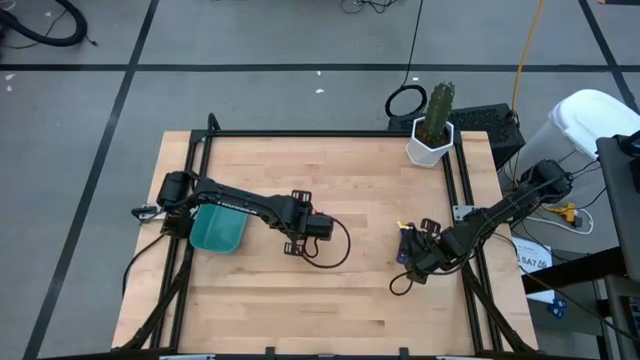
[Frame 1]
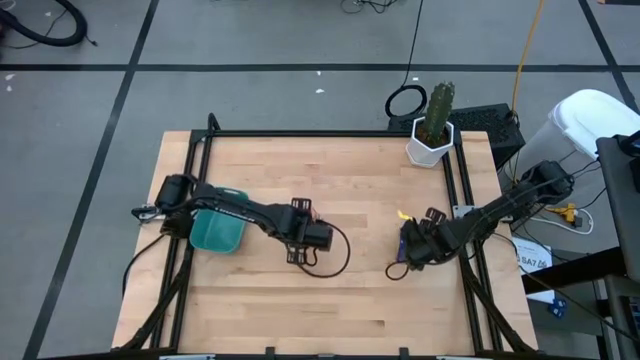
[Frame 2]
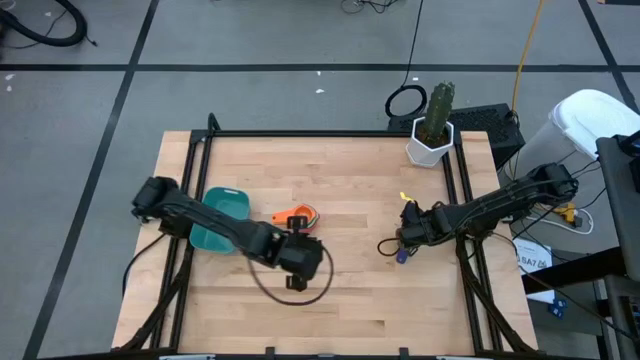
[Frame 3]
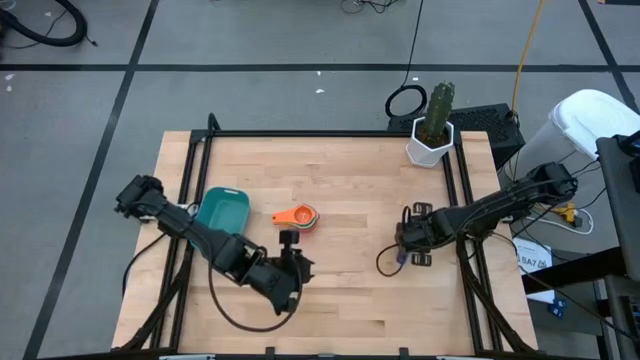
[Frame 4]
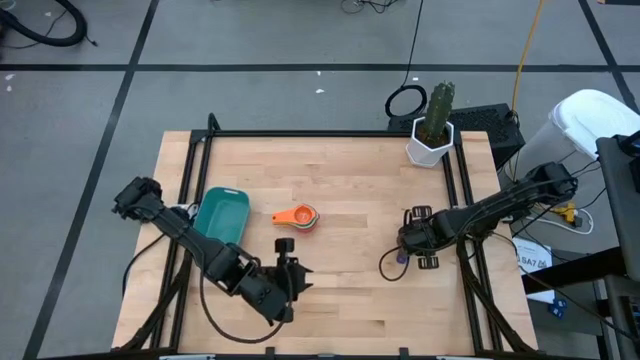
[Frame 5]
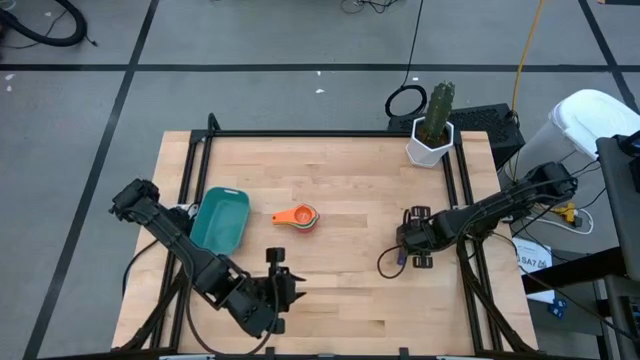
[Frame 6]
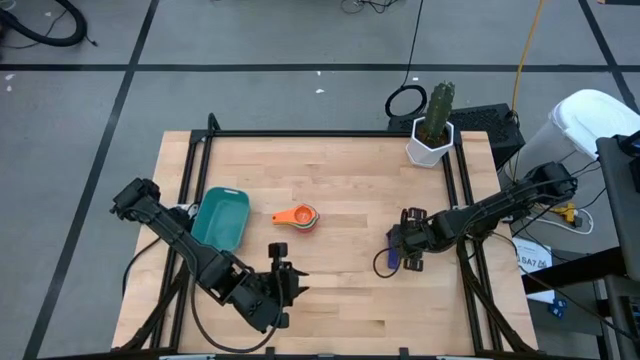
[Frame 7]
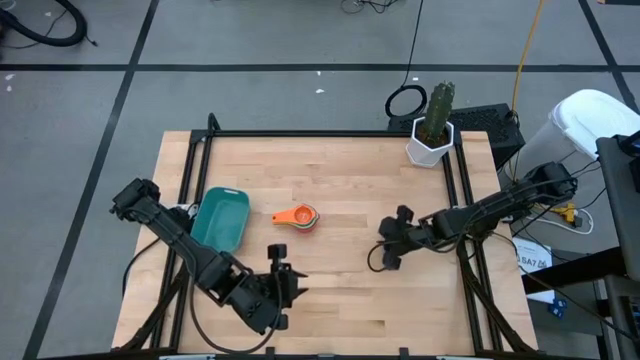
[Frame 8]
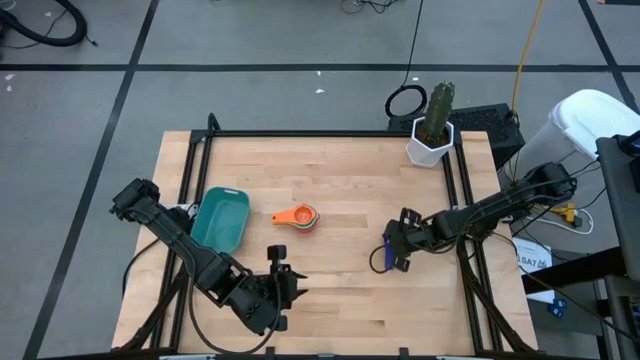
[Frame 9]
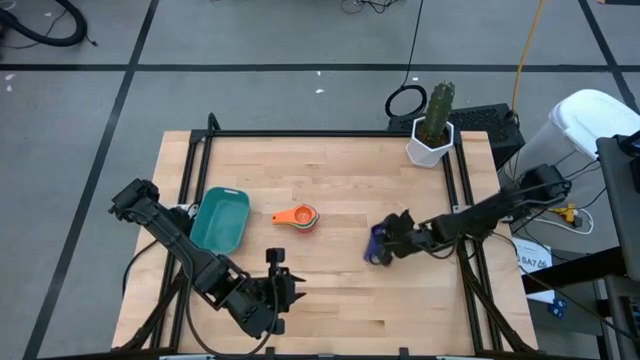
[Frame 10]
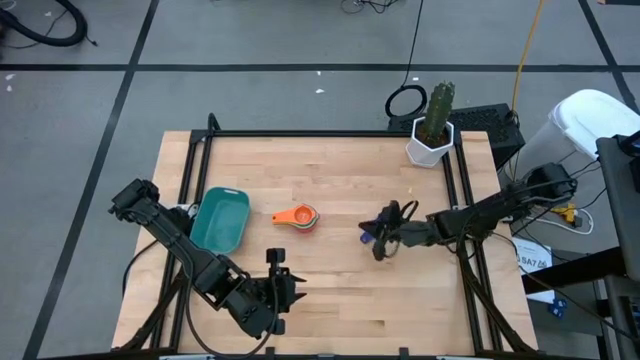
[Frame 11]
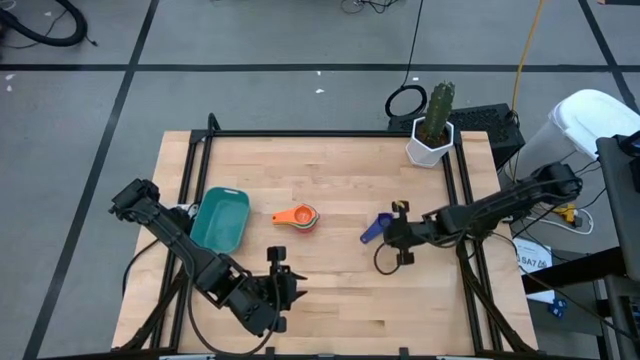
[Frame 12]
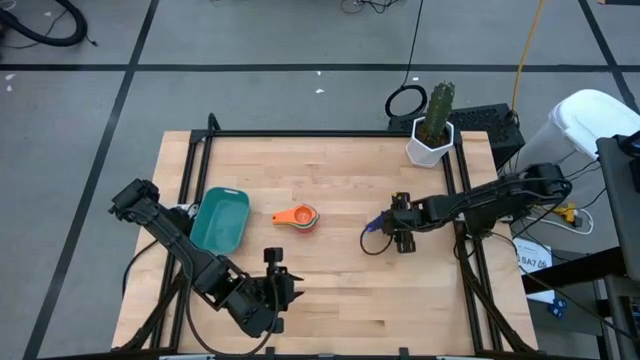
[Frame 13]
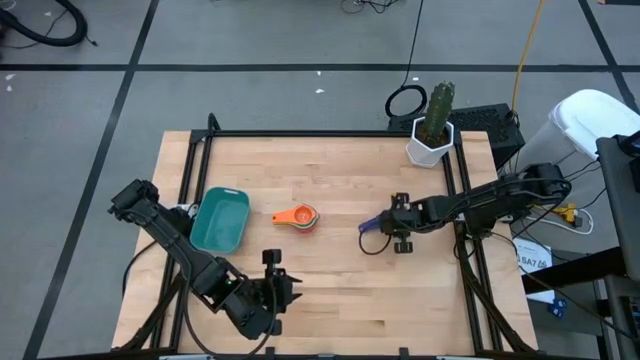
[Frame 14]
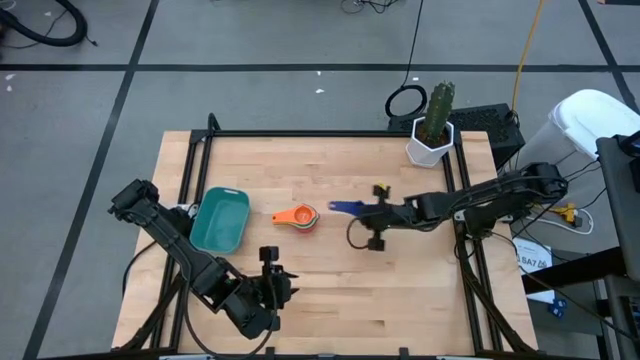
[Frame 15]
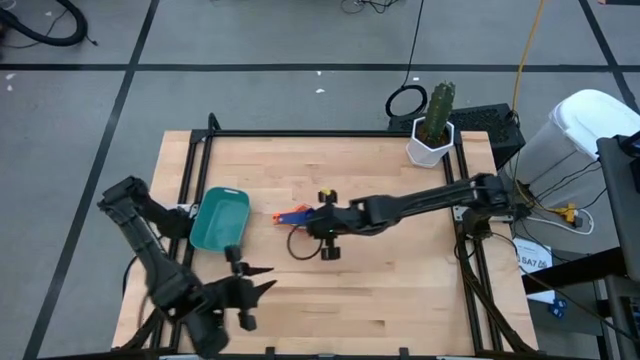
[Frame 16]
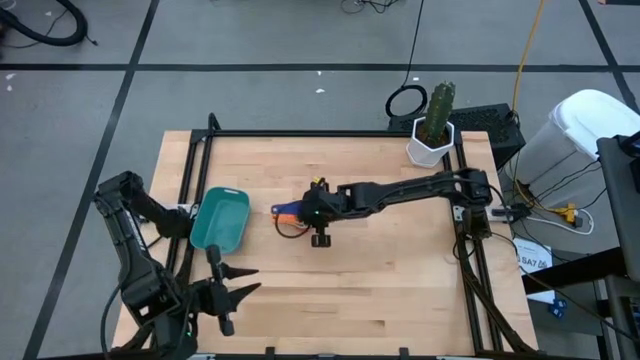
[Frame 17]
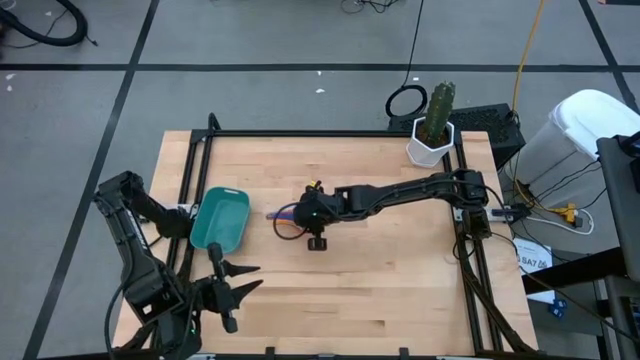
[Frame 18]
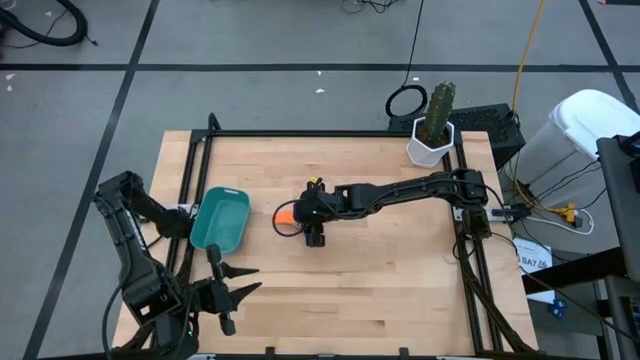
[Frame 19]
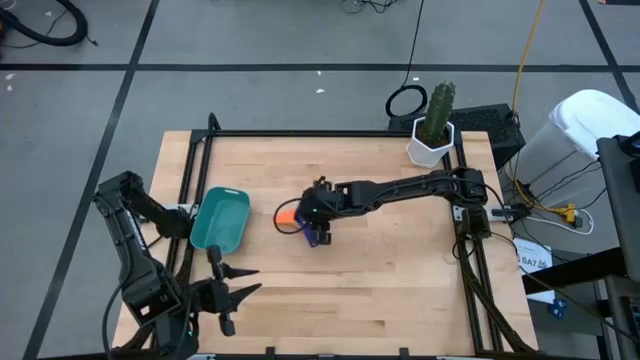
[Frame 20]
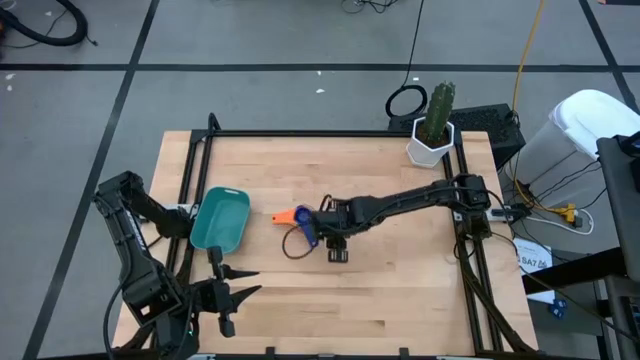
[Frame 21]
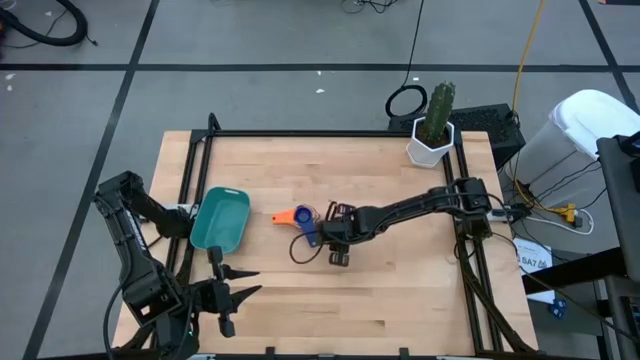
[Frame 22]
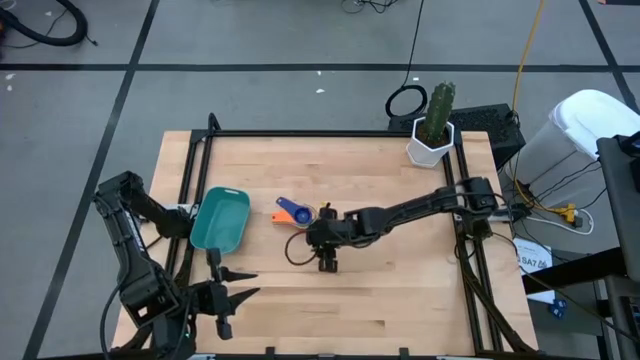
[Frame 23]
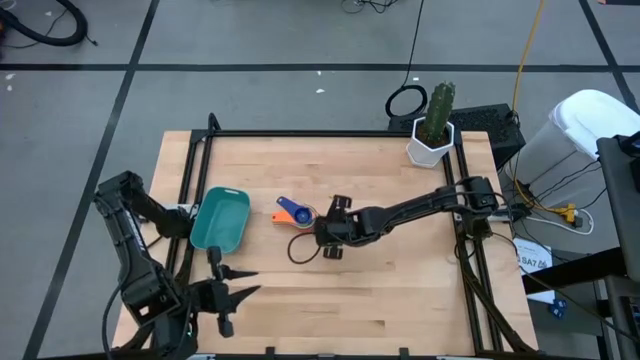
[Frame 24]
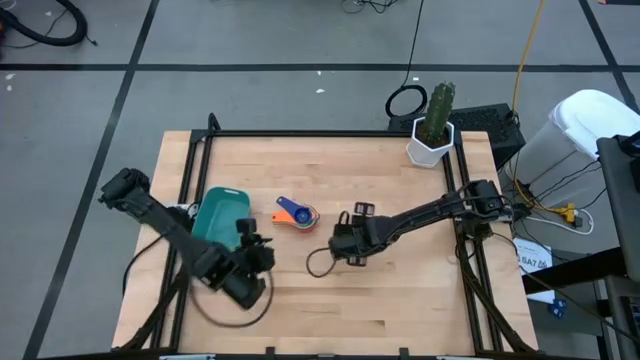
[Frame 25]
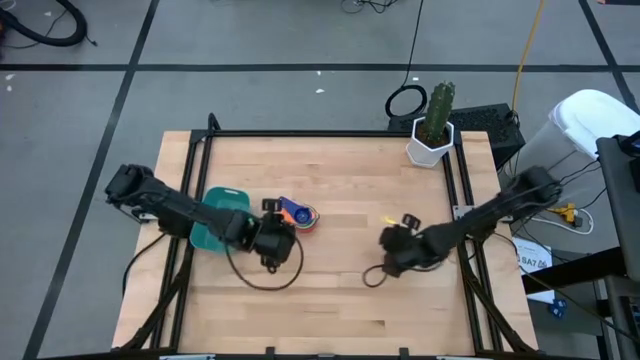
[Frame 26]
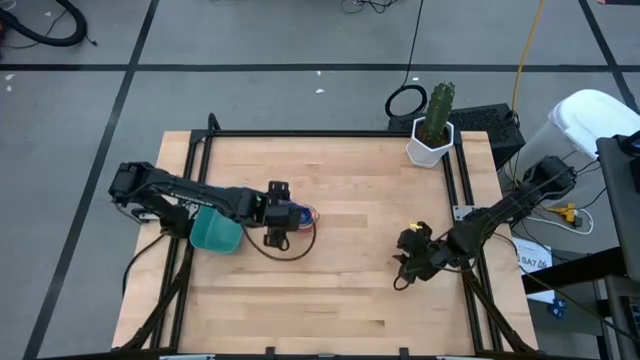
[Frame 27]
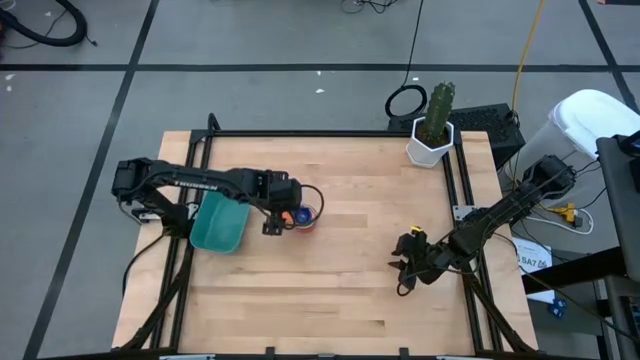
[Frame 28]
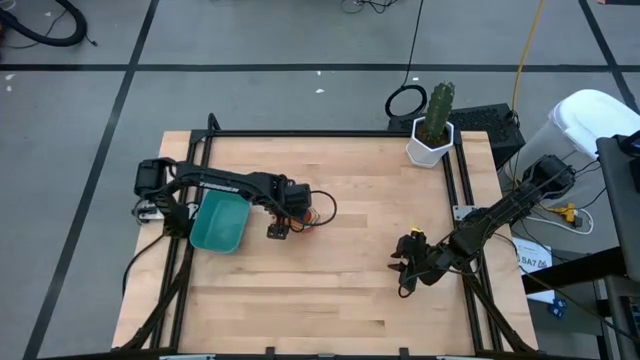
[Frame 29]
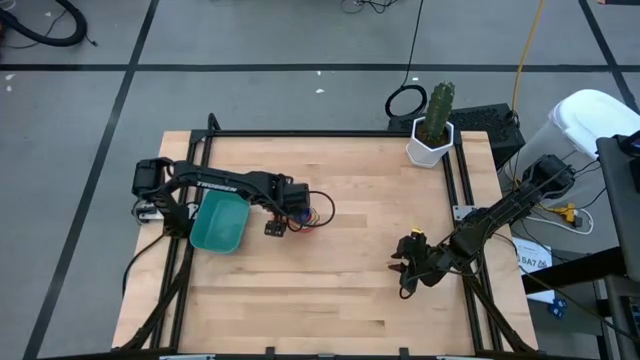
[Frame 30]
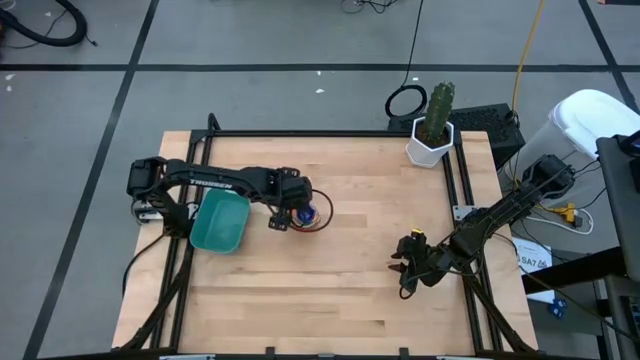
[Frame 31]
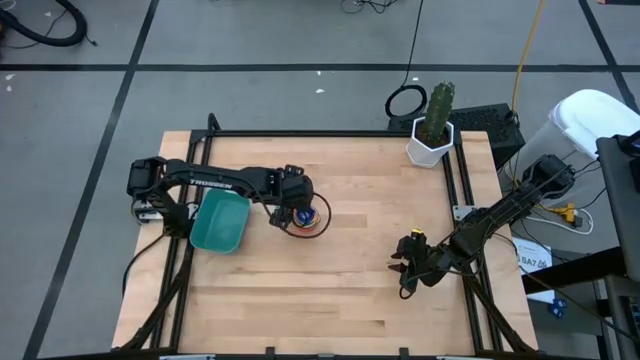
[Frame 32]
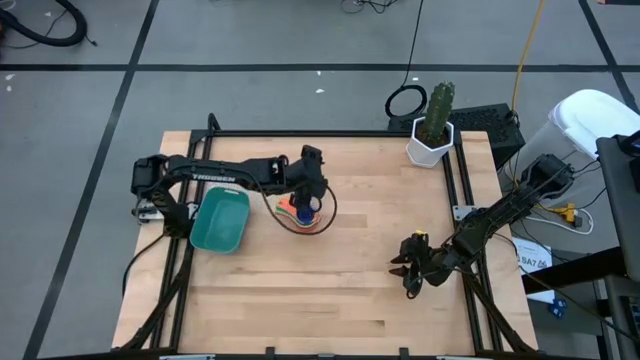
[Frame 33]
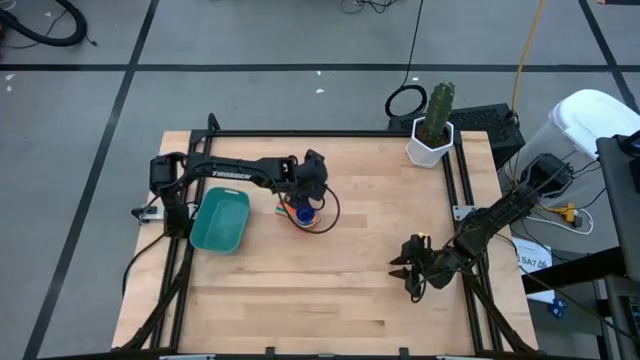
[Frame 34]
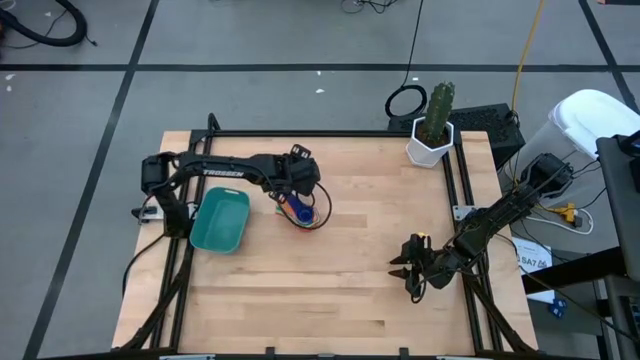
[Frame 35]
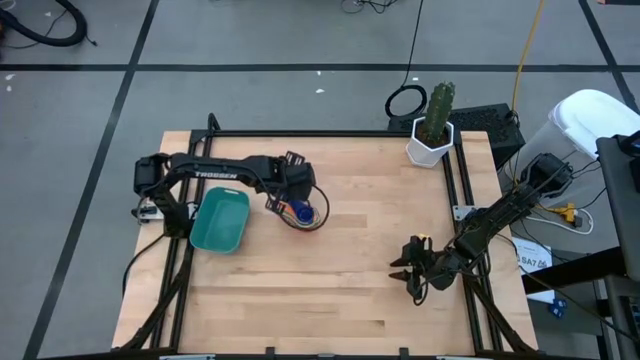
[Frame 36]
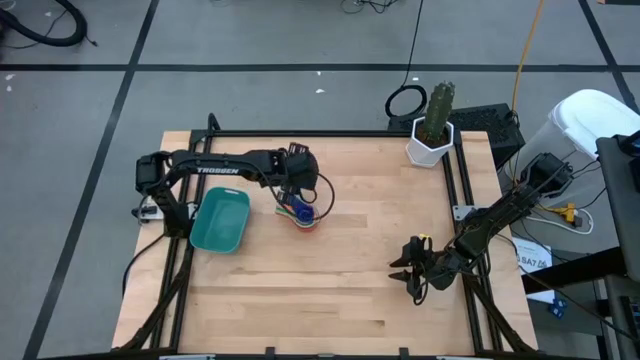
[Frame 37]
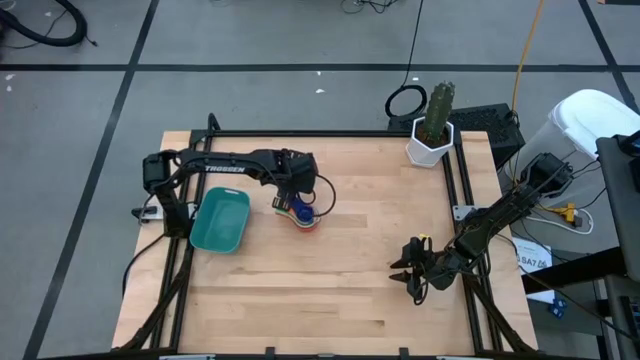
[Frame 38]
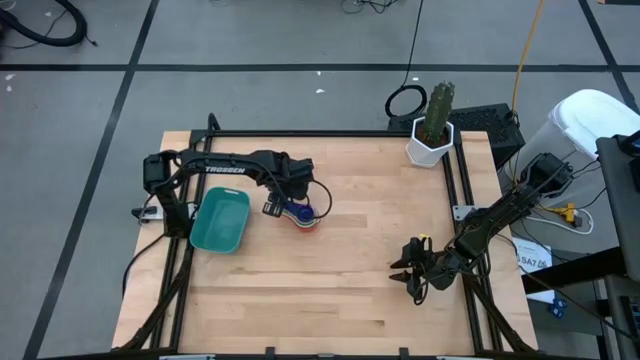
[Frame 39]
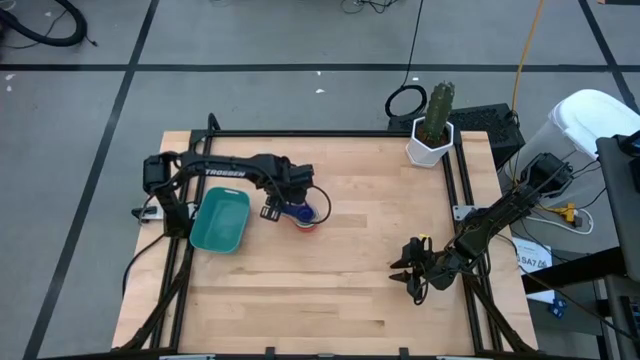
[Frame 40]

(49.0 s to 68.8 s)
Task: Nest measuring cups in basket
Stack the dark blue measuring cup into the orange measuring cup

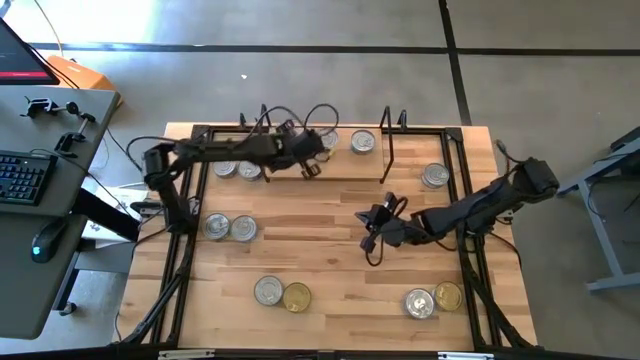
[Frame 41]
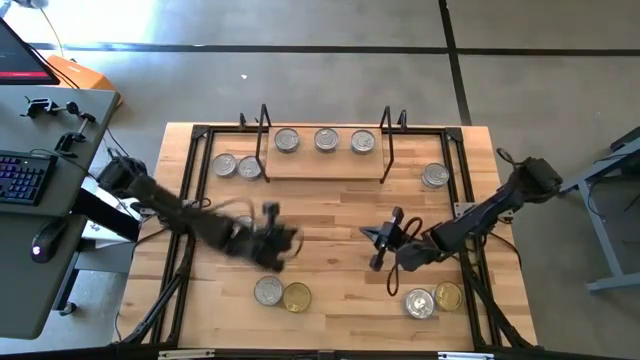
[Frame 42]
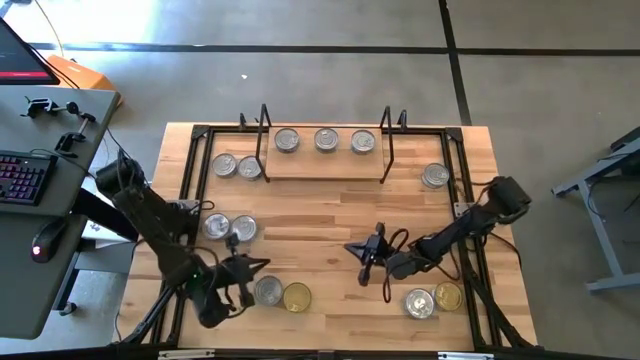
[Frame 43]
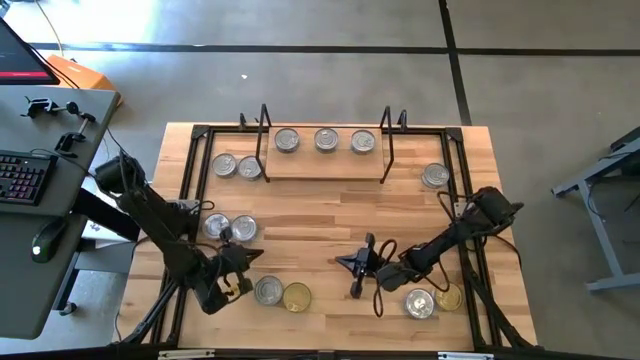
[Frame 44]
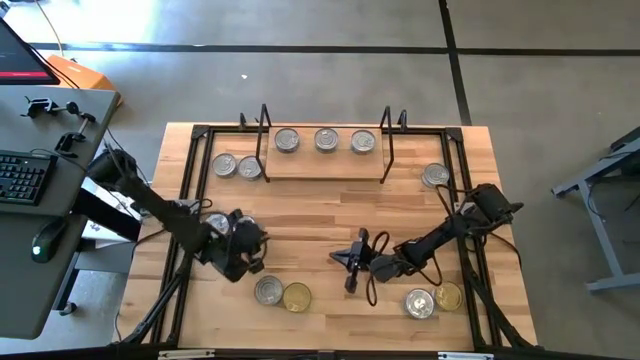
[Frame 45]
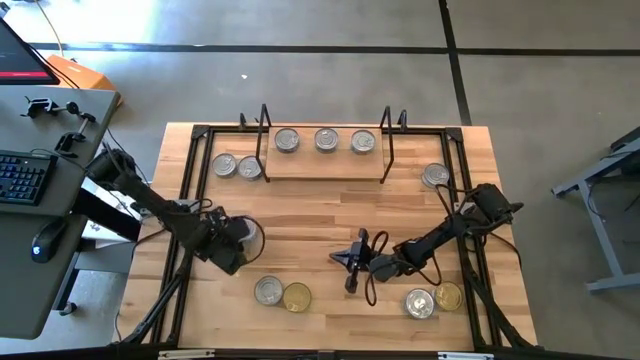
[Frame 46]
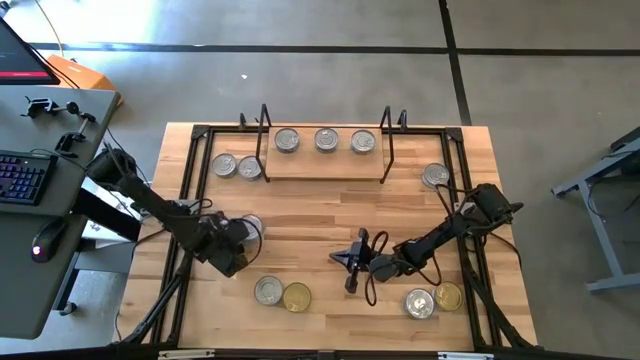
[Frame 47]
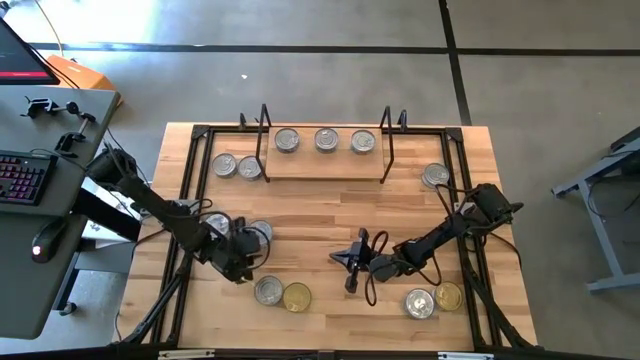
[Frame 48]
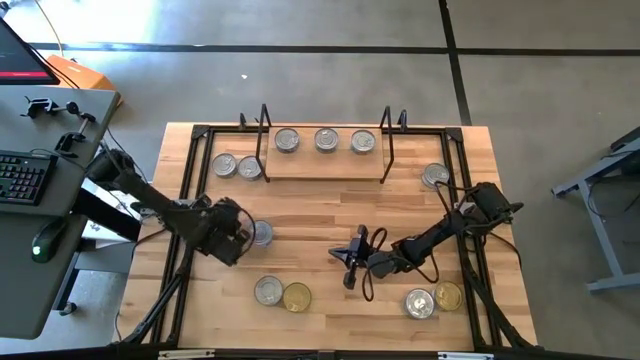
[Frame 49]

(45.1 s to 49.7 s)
Task: Stack canned seafood by type on shelf
Move the green-blue tuna can to the right
